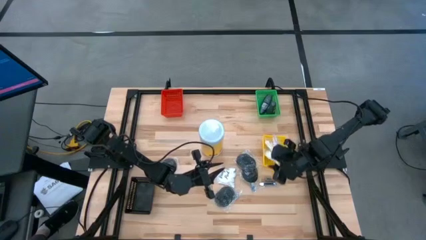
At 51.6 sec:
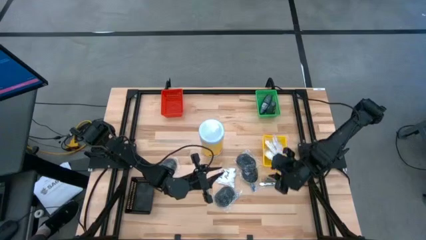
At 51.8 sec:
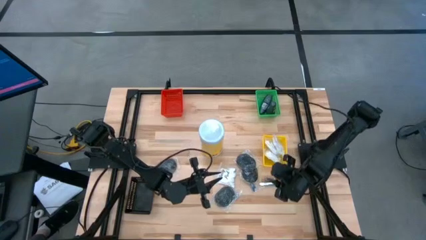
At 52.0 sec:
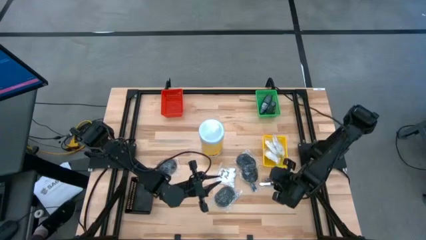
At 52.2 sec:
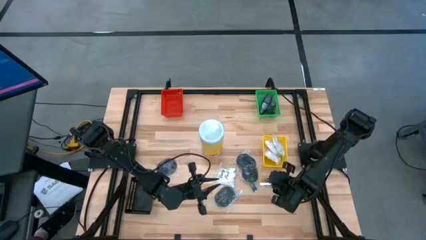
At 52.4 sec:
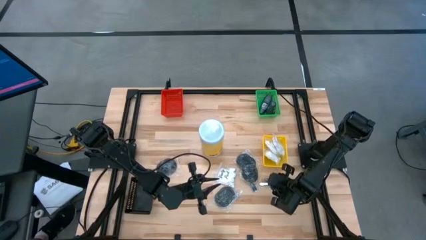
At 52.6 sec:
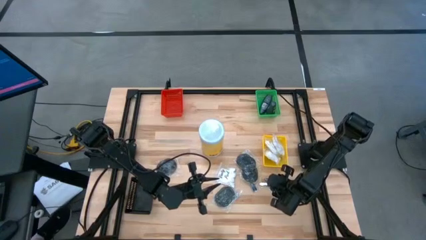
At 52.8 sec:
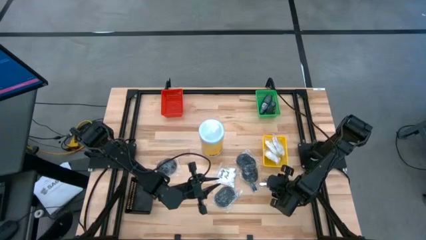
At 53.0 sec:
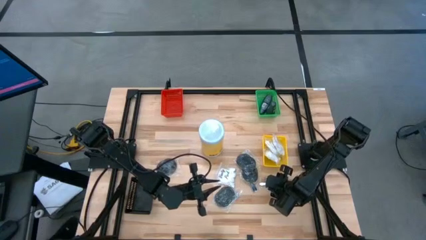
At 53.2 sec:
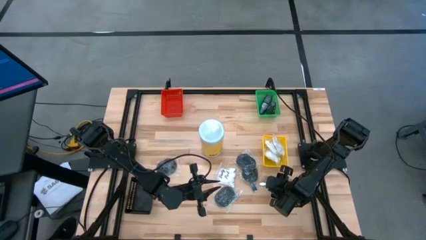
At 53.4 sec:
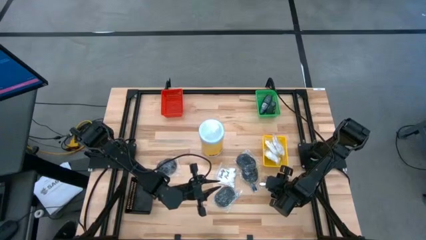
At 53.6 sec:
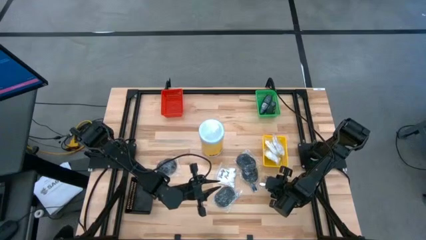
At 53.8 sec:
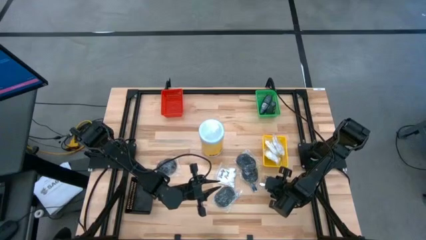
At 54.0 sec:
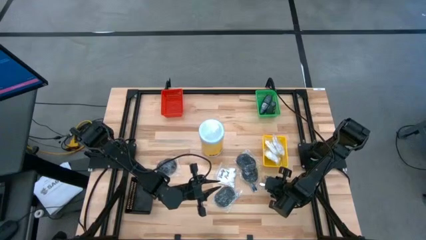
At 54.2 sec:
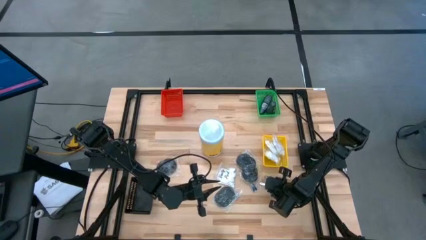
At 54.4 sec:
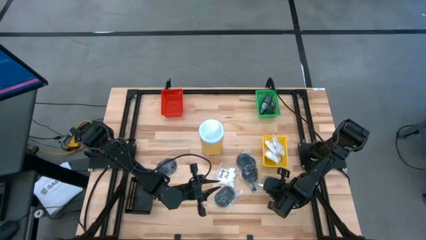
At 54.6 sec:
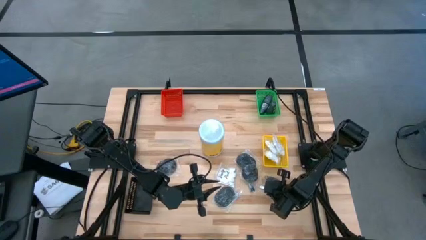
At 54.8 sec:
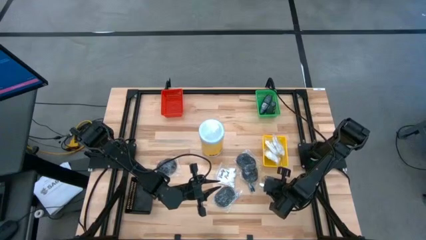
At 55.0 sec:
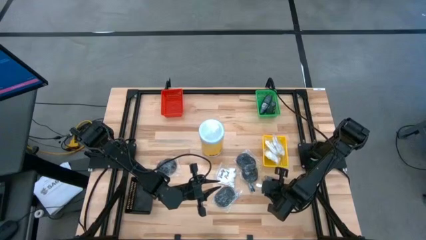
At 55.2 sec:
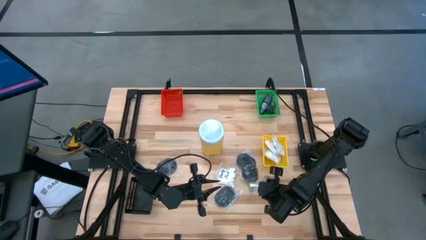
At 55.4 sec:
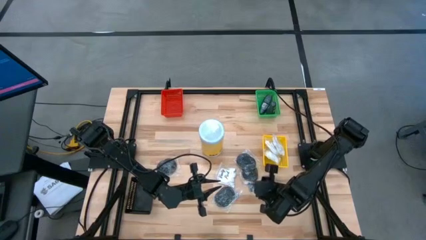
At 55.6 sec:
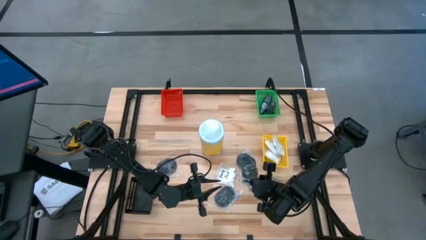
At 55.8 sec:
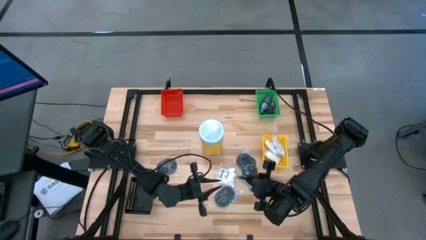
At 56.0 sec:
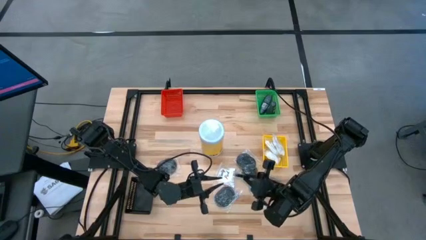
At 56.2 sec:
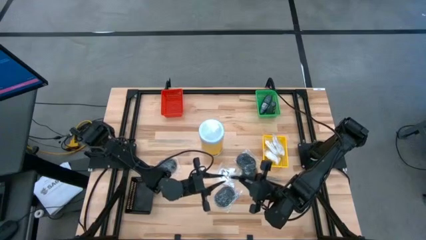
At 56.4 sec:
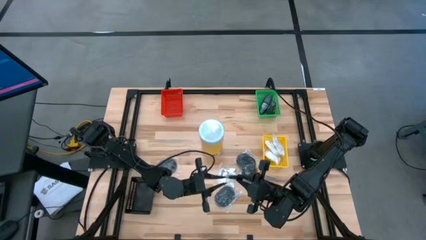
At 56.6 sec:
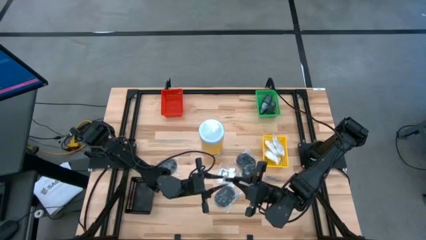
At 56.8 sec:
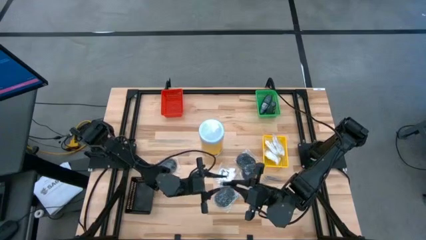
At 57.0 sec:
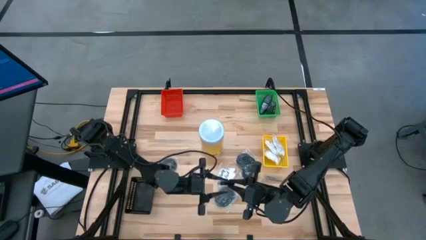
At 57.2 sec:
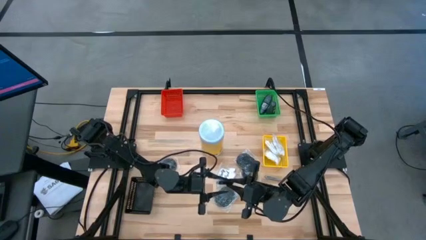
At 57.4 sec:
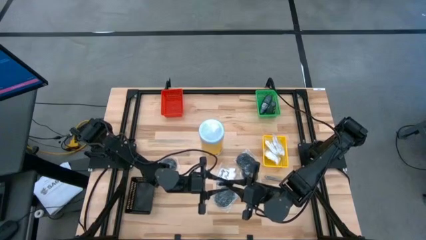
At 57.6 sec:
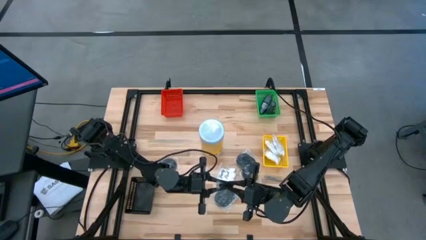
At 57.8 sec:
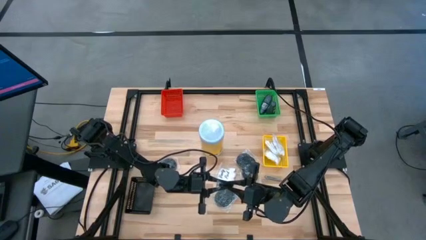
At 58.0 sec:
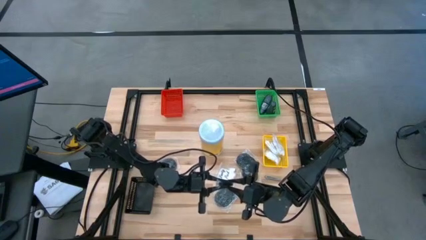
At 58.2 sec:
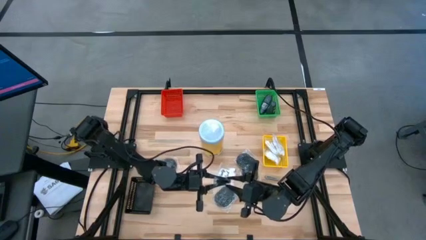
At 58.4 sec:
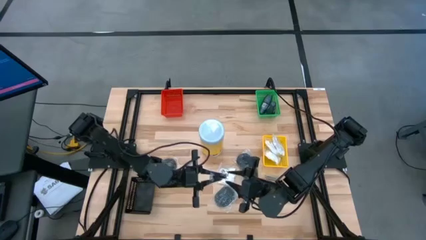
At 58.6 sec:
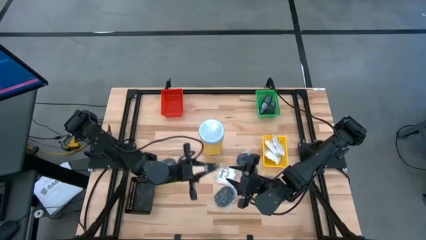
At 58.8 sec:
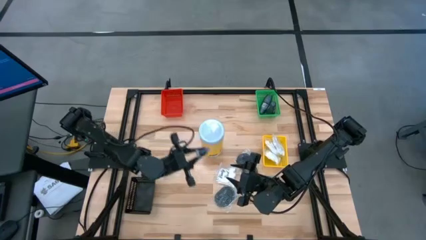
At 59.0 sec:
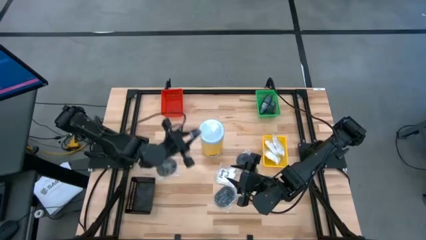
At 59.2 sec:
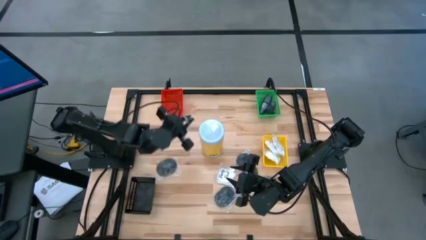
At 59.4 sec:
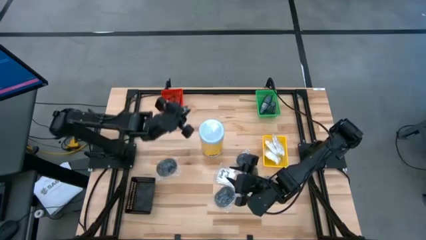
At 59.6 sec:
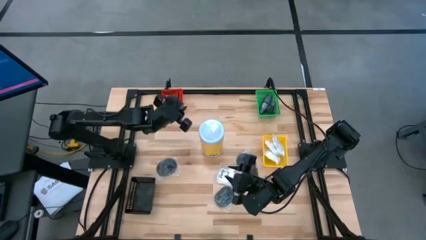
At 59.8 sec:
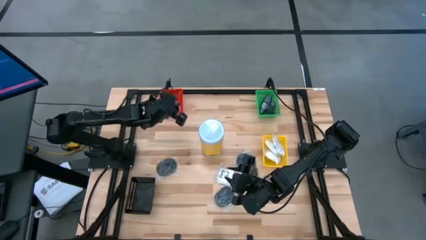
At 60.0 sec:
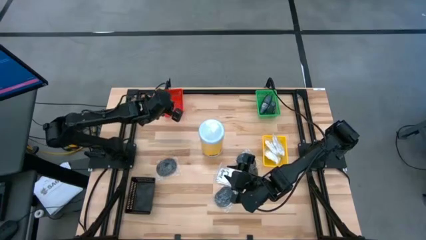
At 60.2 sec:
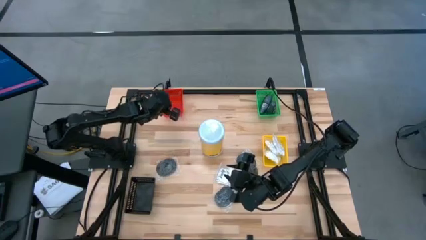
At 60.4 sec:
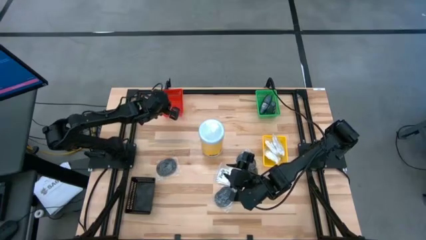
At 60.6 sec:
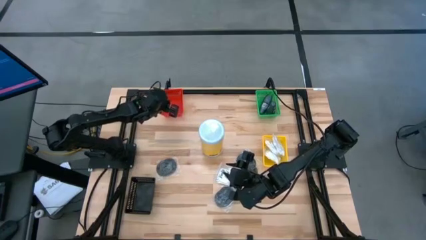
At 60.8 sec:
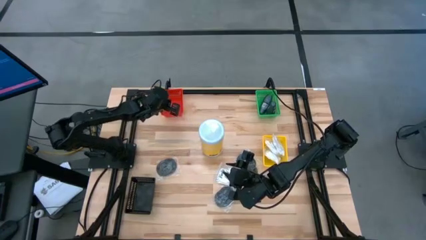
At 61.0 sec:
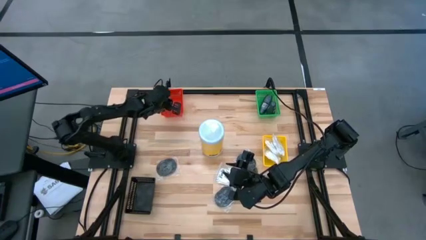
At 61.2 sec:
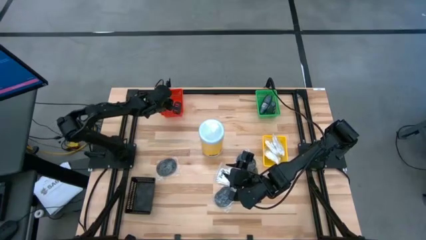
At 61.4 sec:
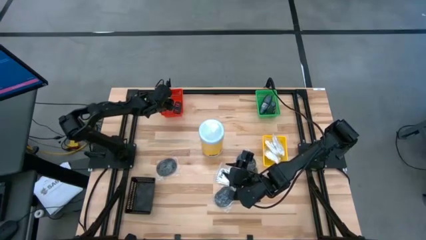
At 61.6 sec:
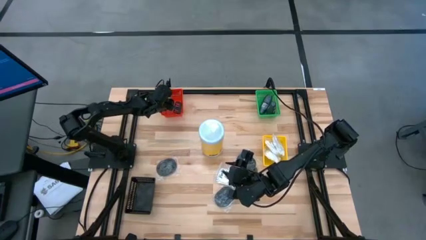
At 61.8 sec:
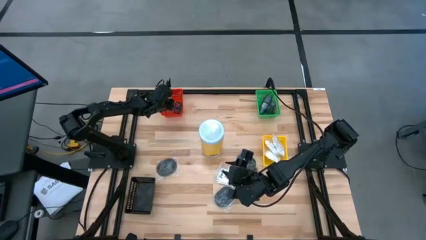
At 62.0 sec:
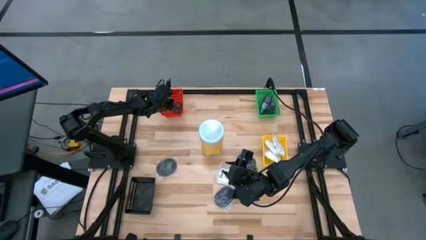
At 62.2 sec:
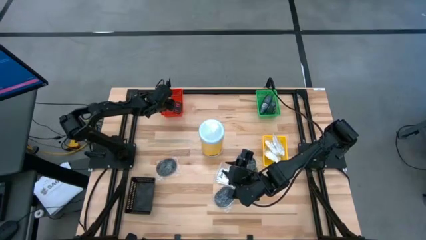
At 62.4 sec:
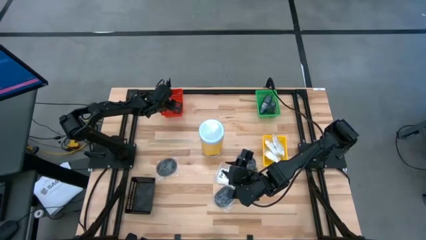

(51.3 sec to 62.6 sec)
Task: Pick & Place Travel size toiletries
Put the silver nail cutter into the red bin

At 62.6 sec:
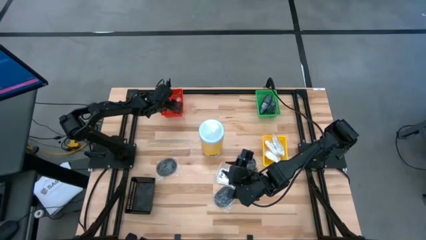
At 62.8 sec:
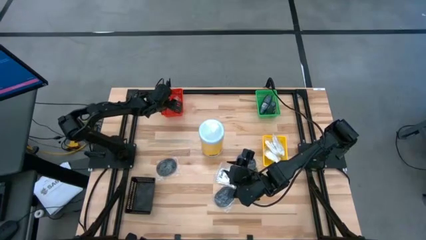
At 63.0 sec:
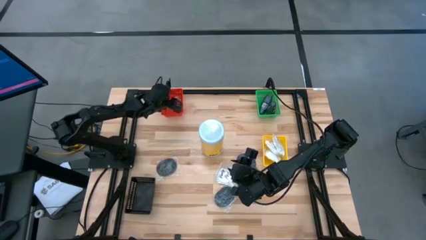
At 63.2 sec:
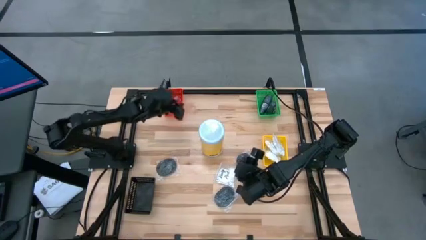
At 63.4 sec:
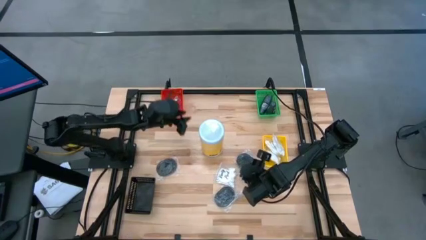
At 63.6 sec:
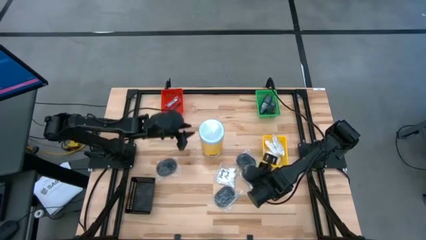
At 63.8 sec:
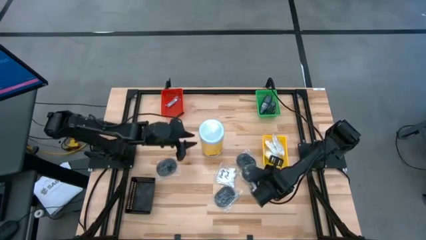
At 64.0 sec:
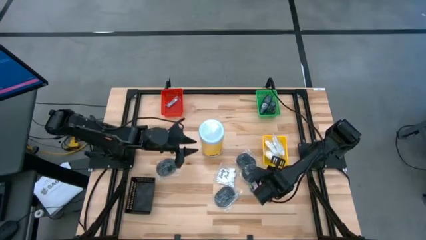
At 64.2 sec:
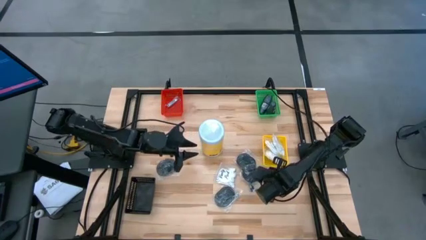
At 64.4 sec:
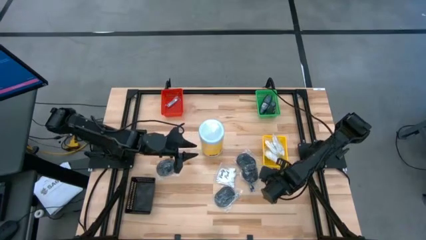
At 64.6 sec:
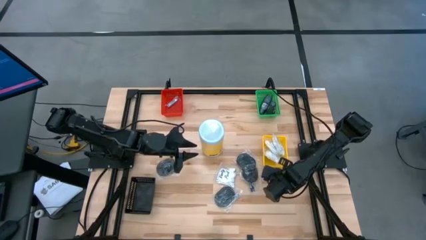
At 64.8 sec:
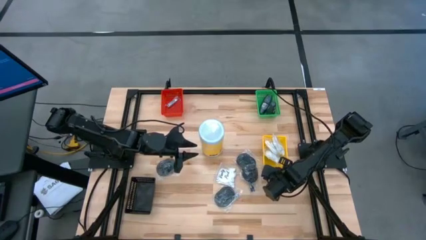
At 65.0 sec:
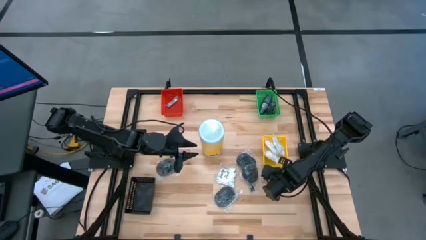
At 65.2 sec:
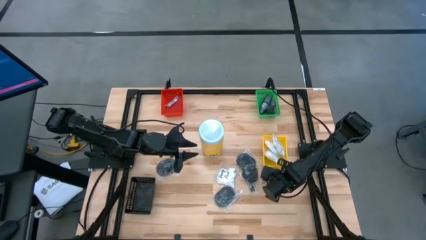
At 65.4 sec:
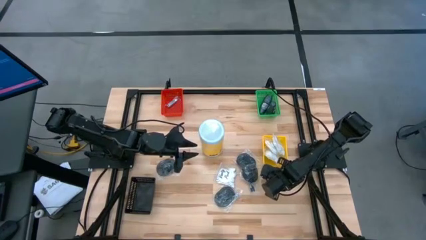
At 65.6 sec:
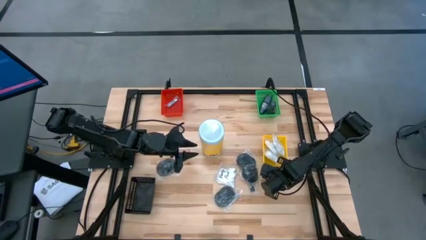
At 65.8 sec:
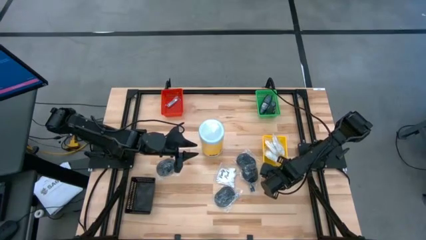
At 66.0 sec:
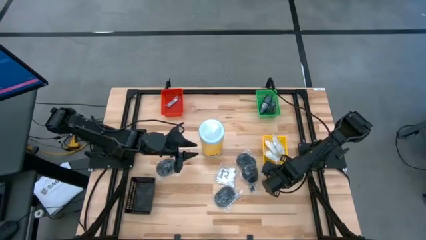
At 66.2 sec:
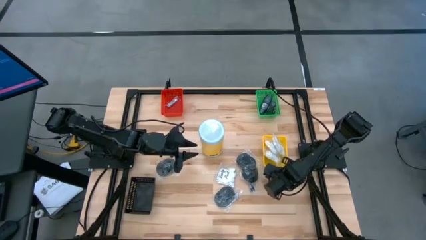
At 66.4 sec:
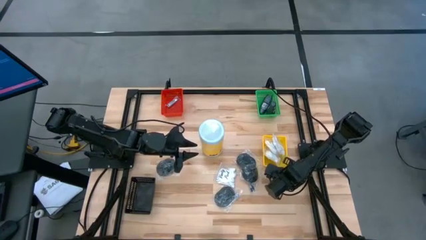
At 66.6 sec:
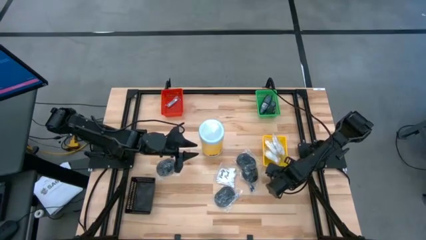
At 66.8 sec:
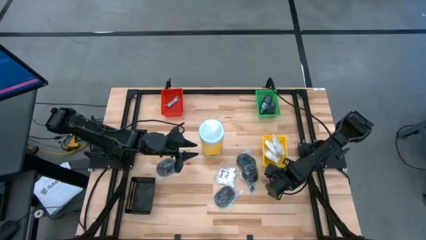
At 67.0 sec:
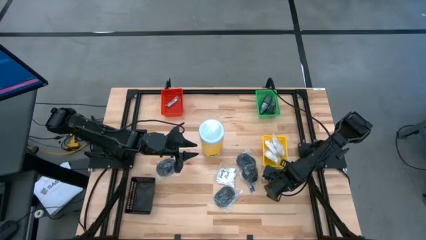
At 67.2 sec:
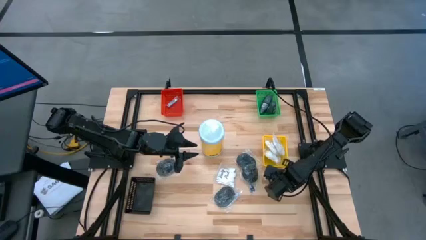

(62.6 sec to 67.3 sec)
Put the silver nail cutter into the red bin
